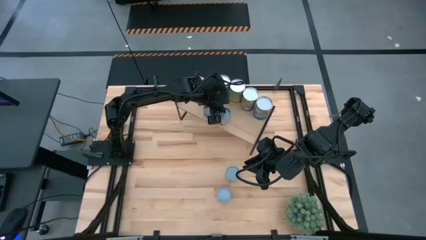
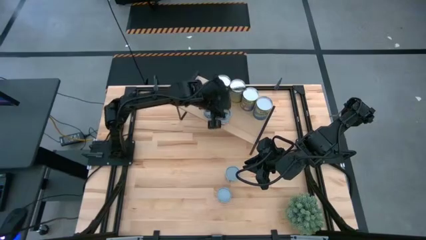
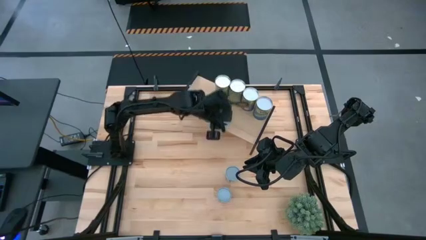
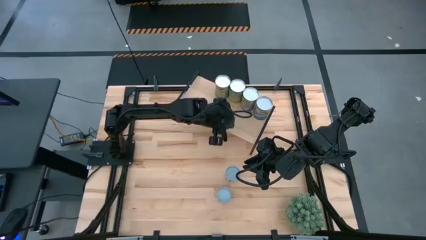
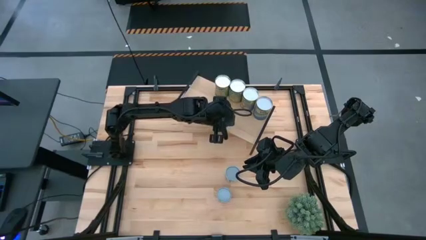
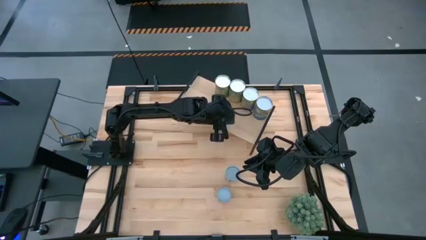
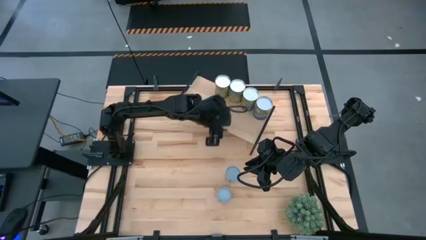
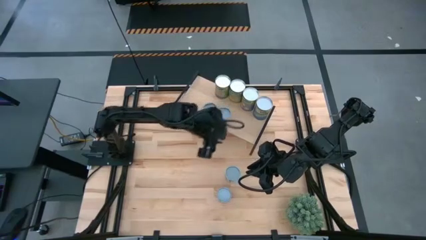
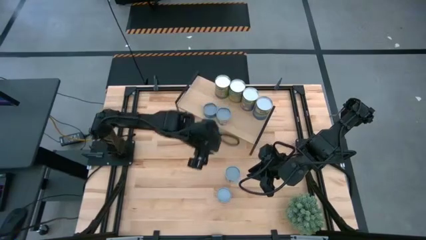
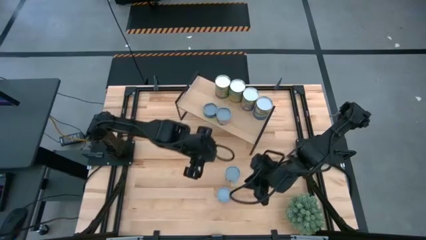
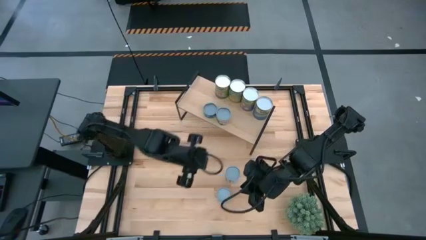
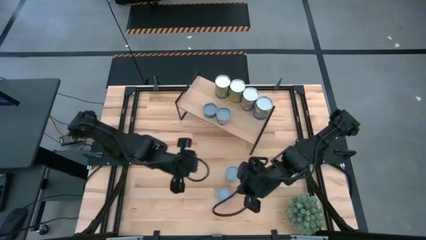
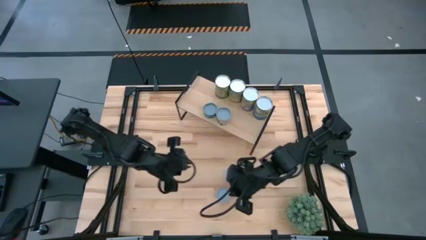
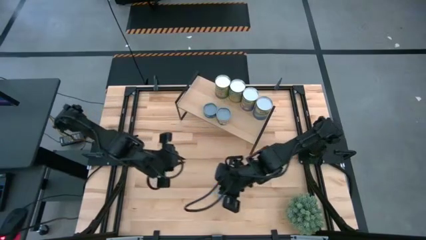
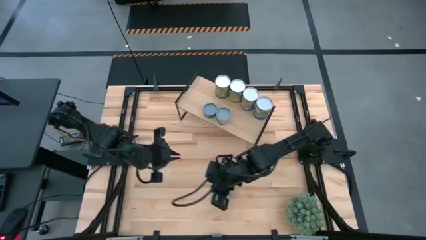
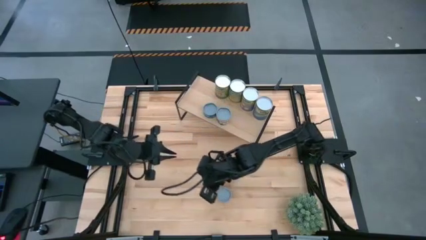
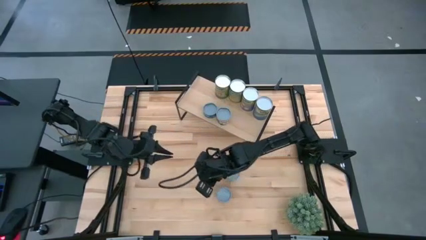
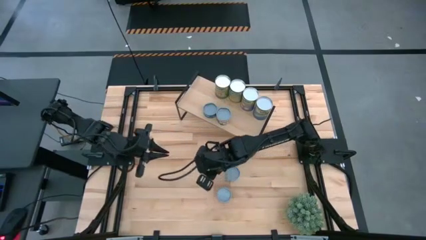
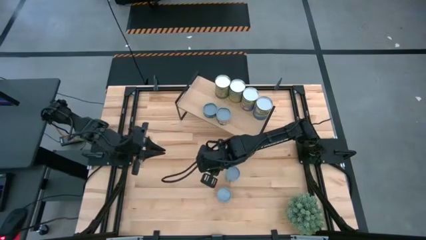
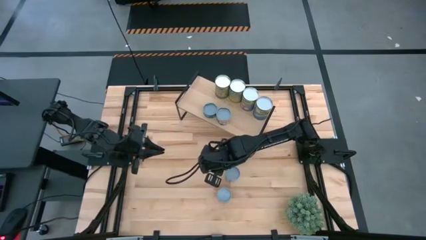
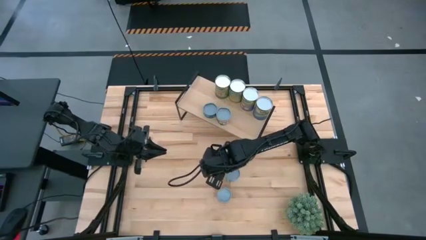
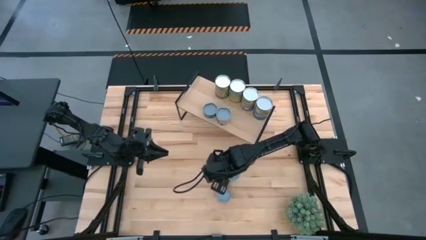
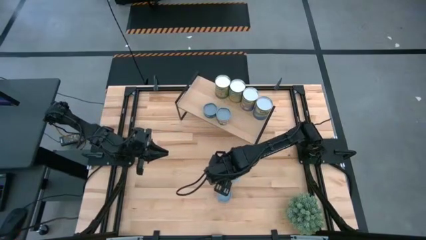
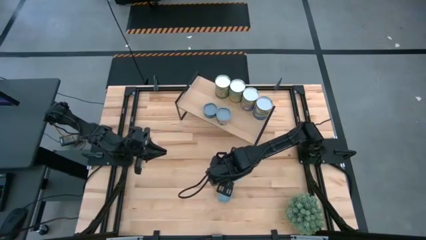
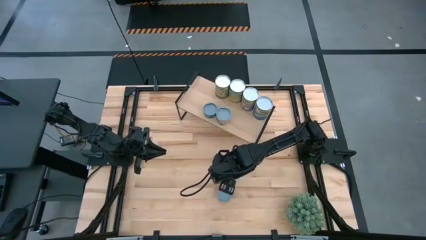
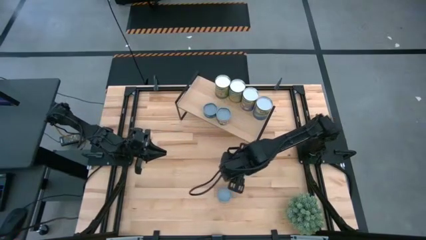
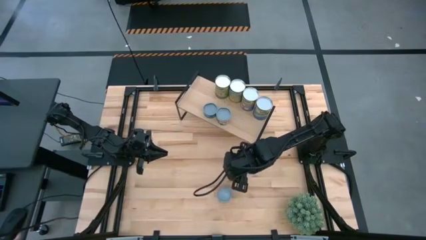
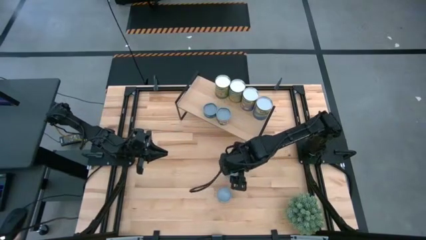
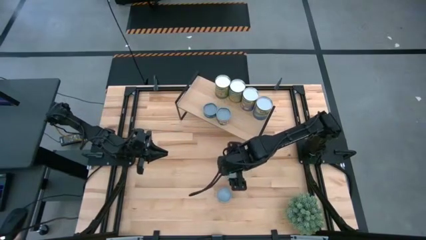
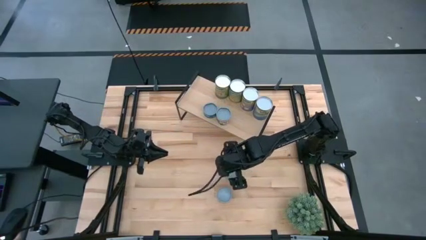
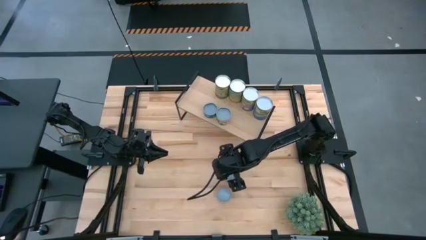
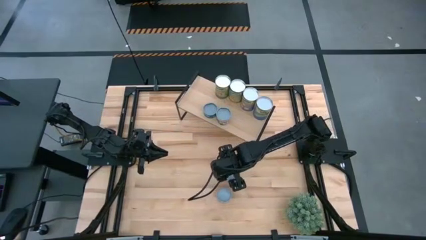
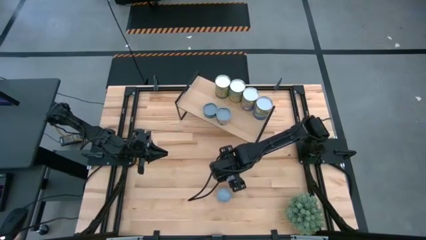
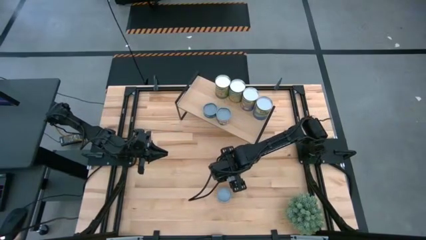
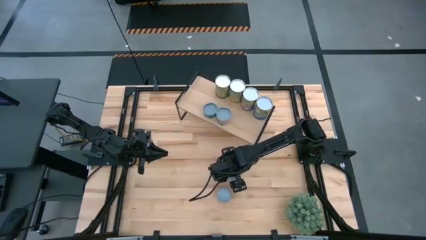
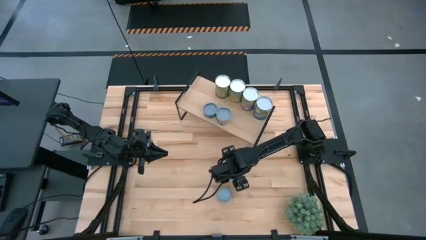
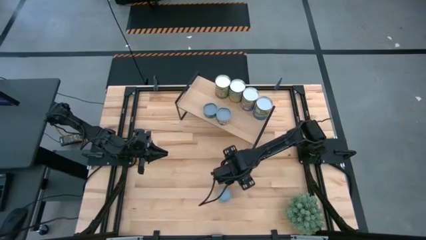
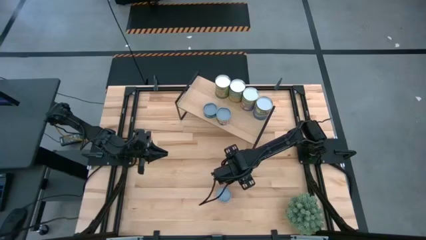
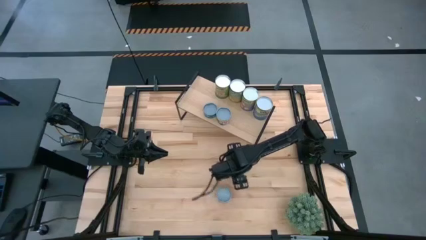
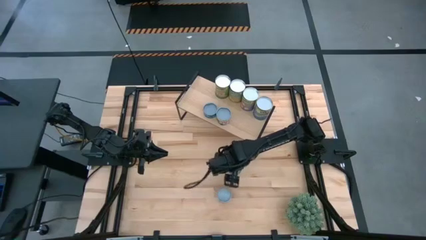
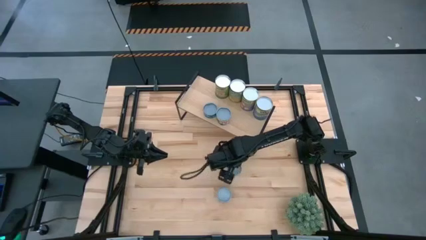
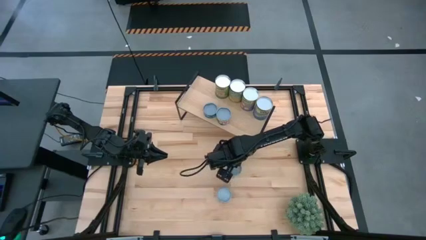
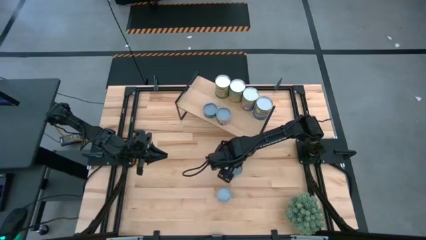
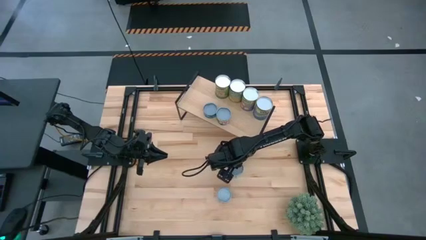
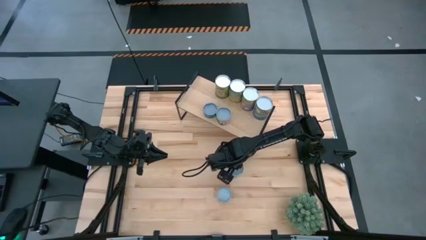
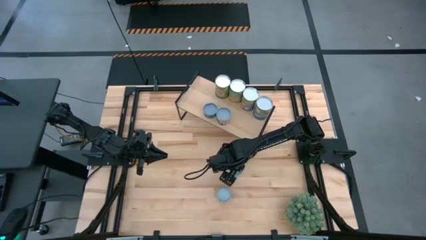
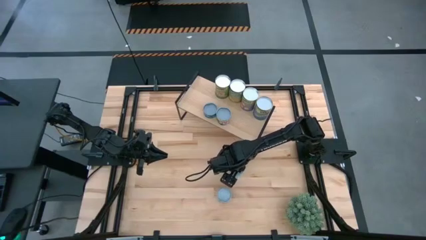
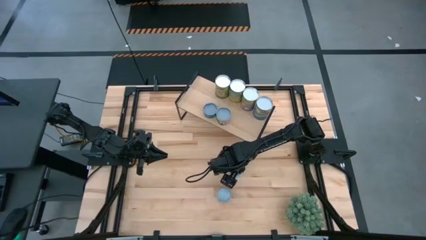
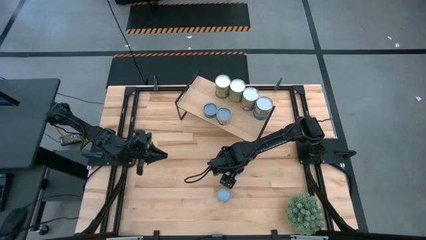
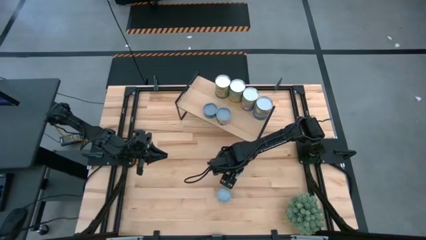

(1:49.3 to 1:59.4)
Task: Pick and place cans onto a shelf
Put the white canned mixed vegetables on the shelf

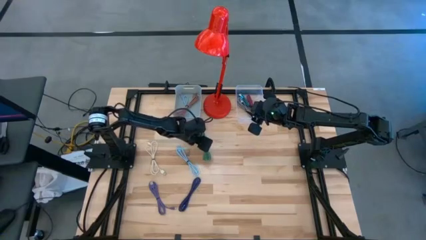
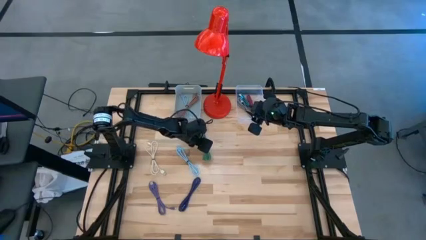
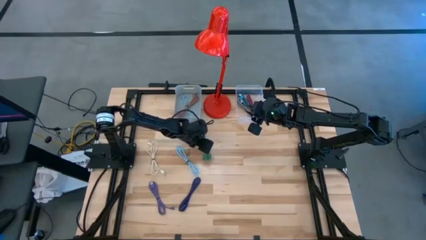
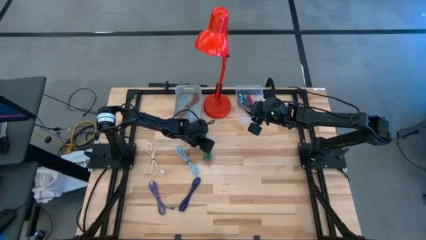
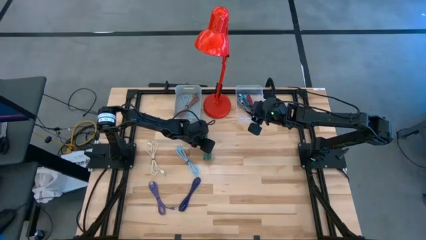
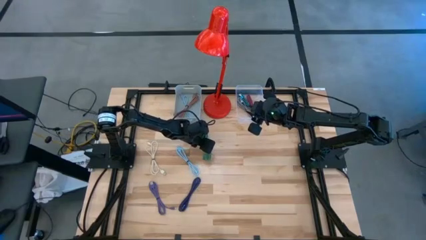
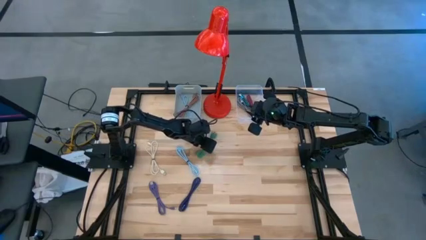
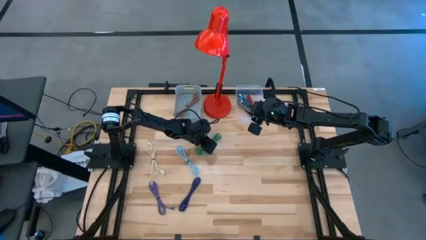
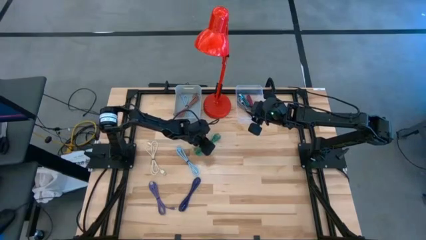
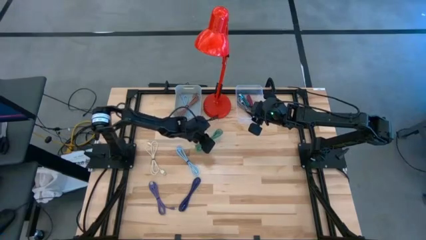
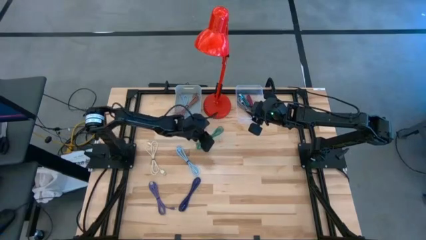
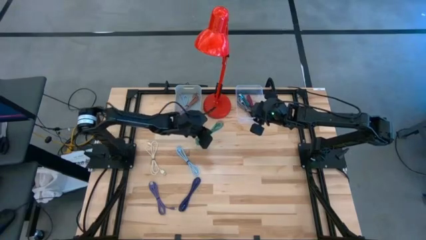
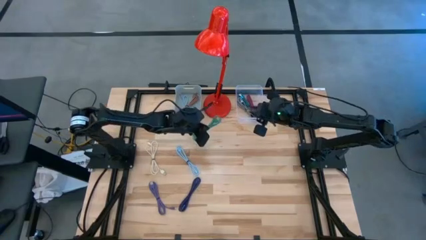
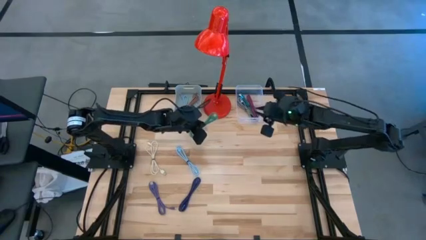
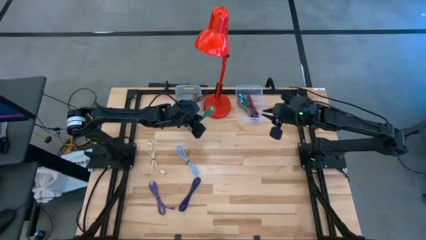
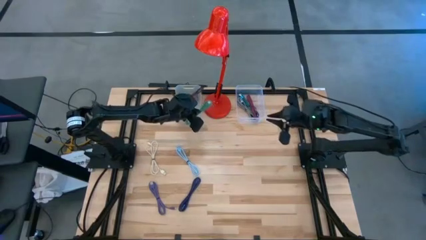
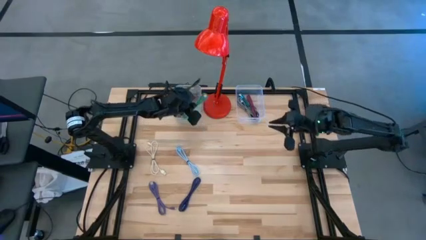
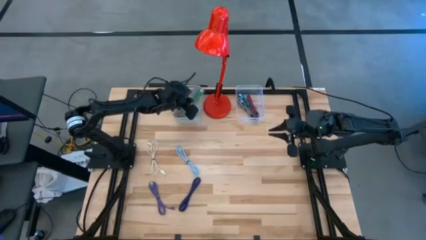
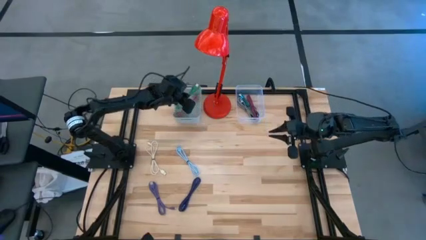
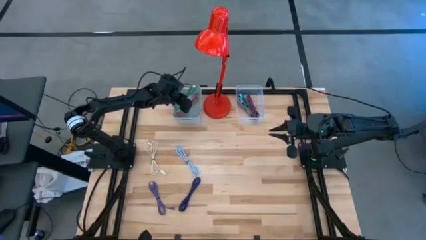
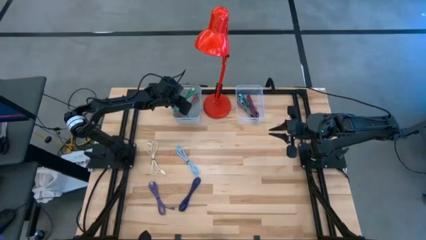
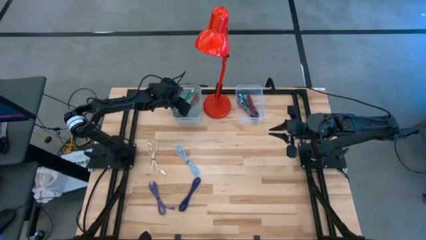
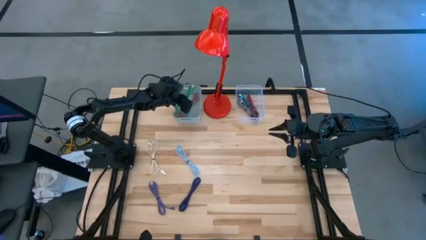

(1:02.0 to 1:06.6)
Task: Pick & Place USB Port
Put the green charger cable into the gray bin
